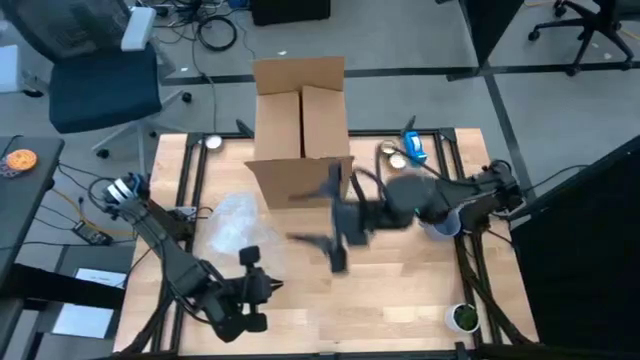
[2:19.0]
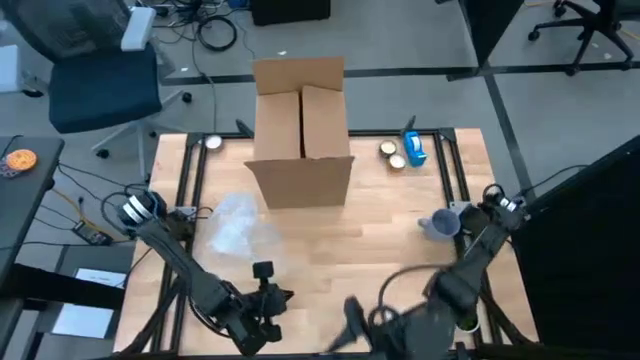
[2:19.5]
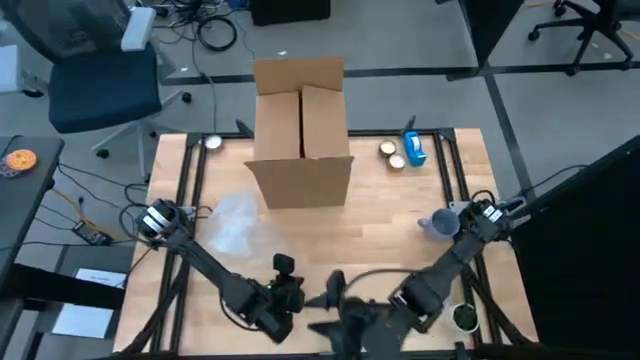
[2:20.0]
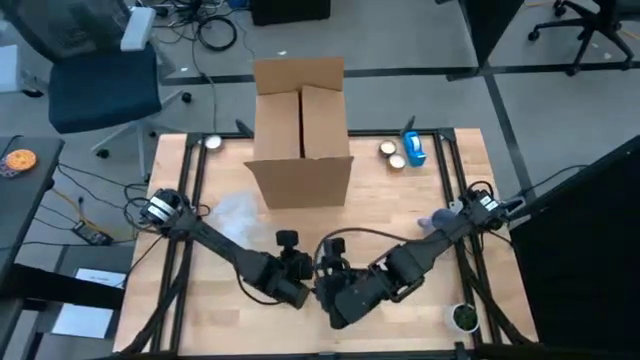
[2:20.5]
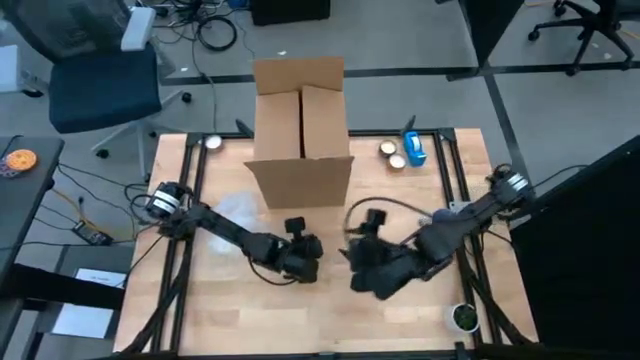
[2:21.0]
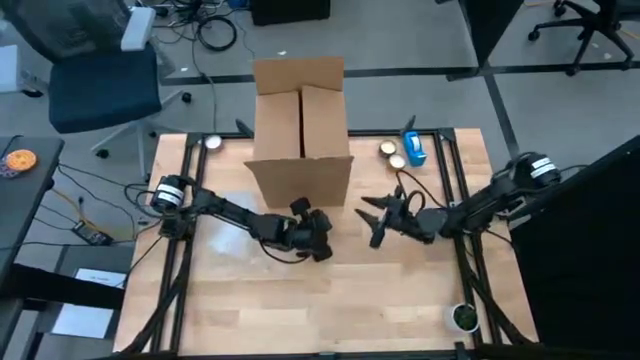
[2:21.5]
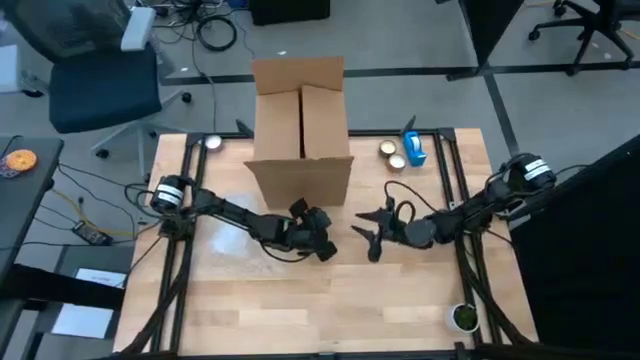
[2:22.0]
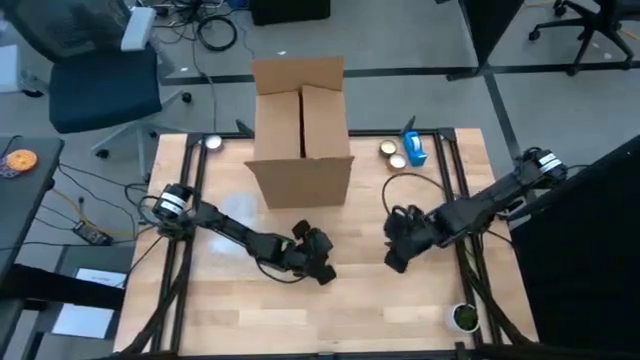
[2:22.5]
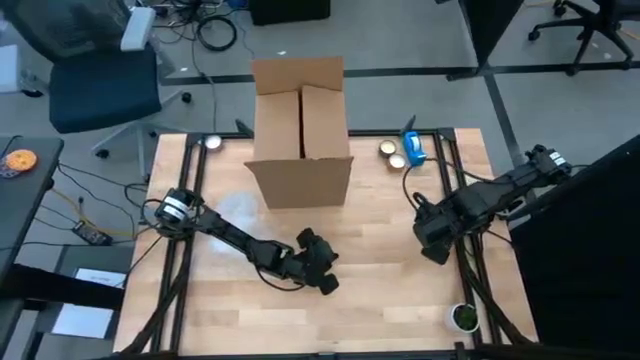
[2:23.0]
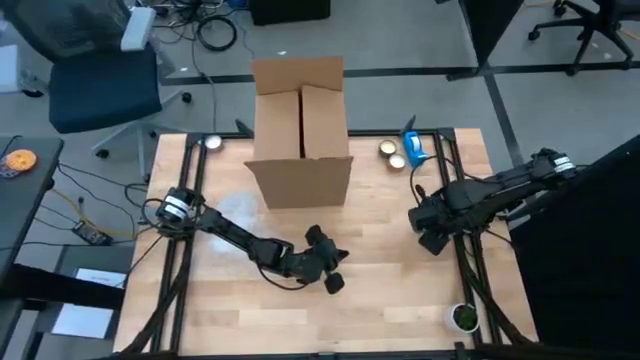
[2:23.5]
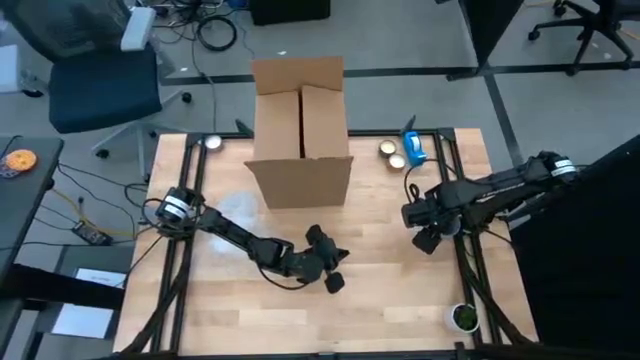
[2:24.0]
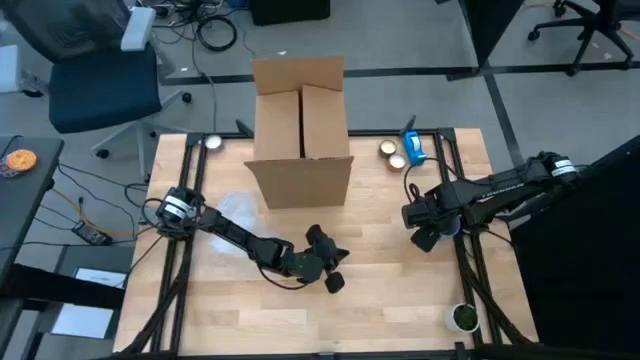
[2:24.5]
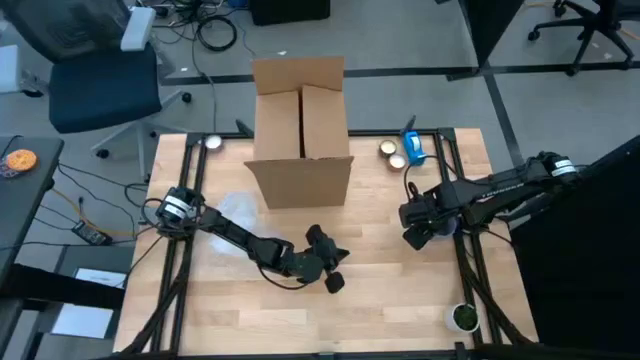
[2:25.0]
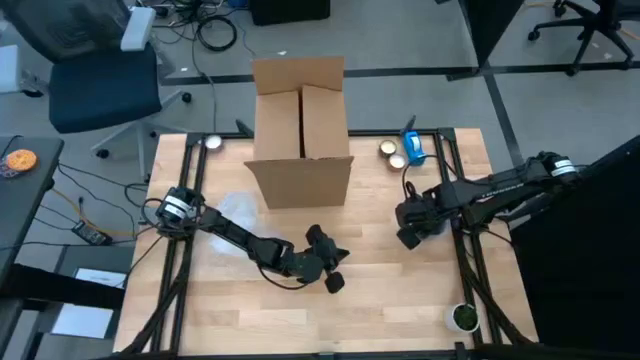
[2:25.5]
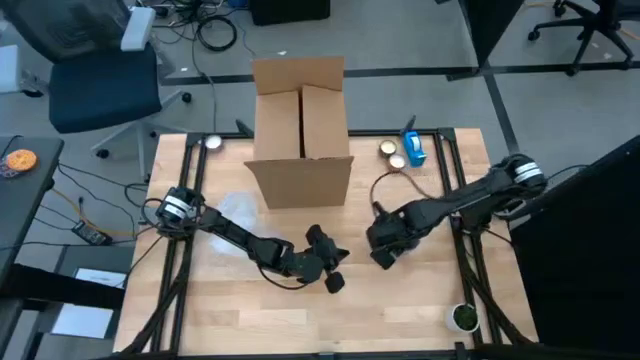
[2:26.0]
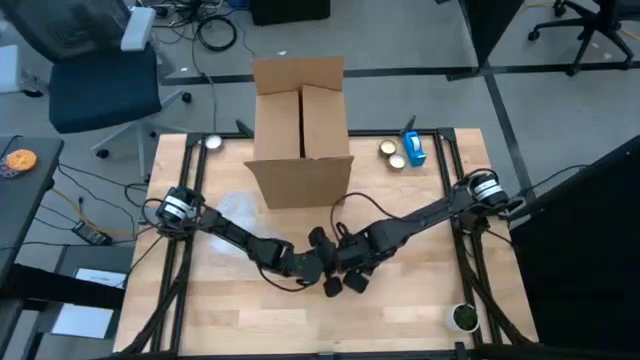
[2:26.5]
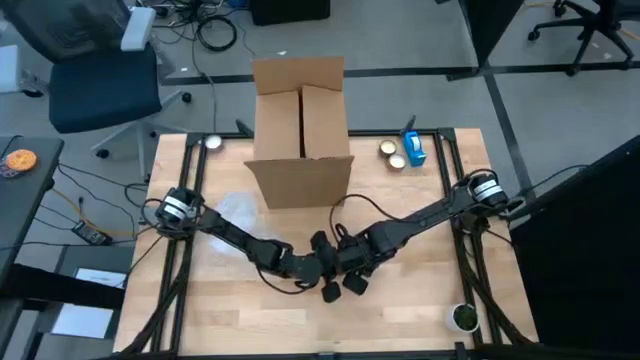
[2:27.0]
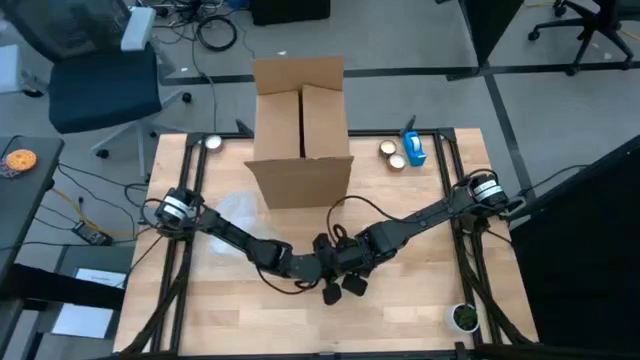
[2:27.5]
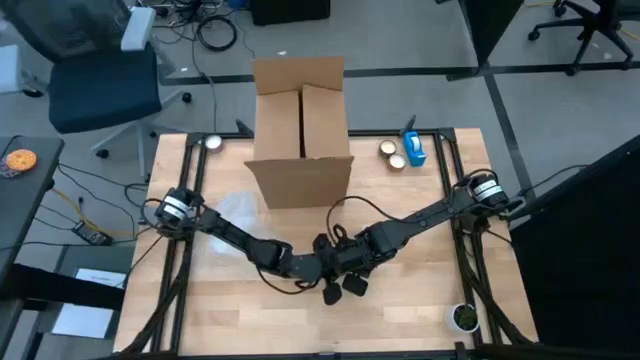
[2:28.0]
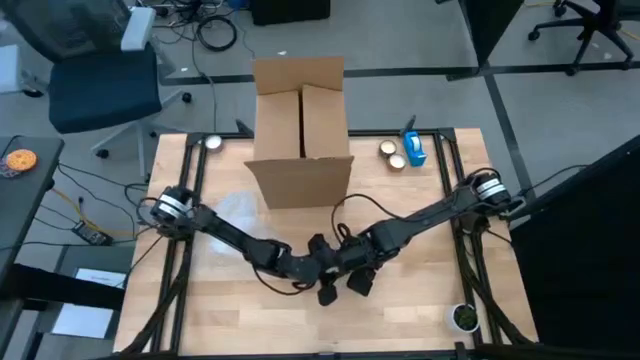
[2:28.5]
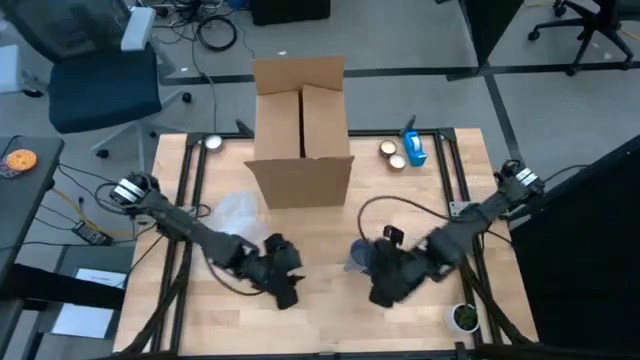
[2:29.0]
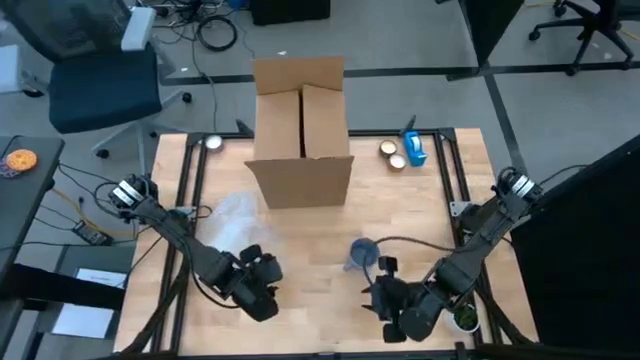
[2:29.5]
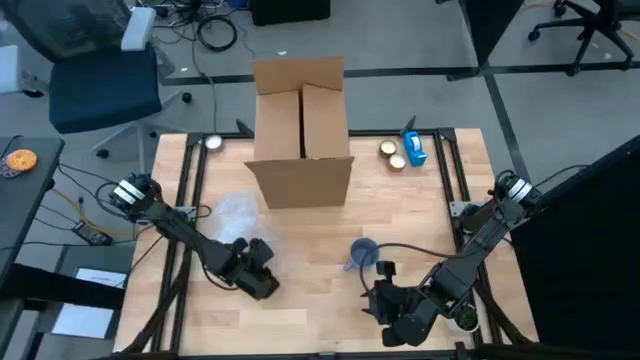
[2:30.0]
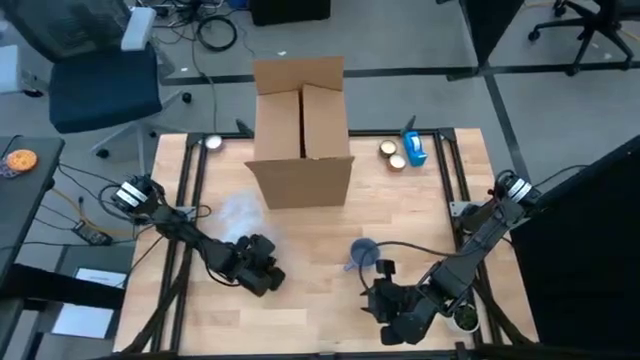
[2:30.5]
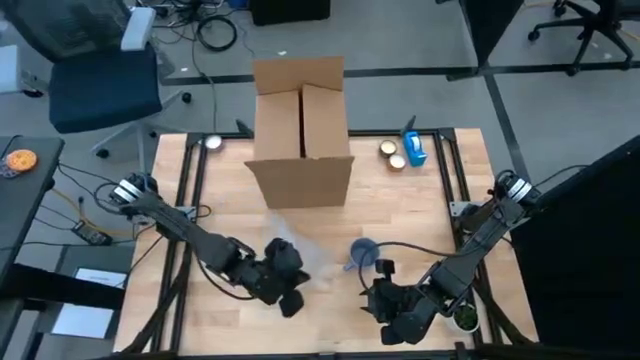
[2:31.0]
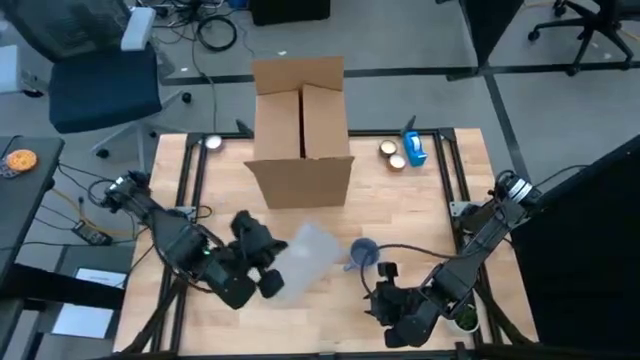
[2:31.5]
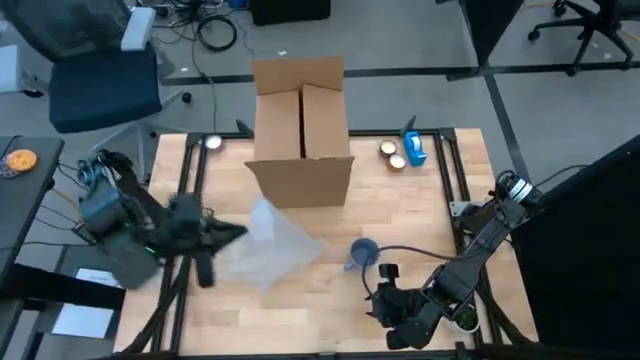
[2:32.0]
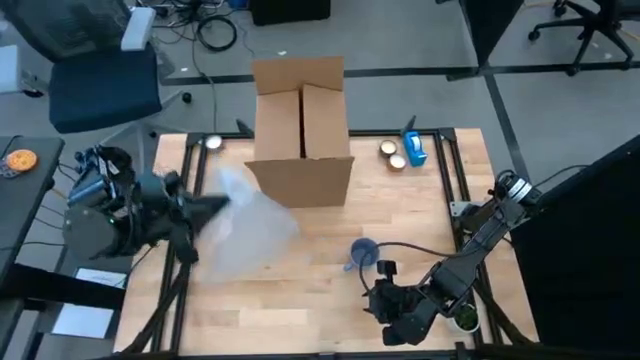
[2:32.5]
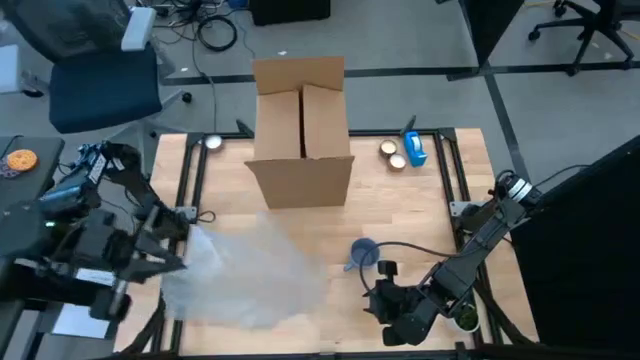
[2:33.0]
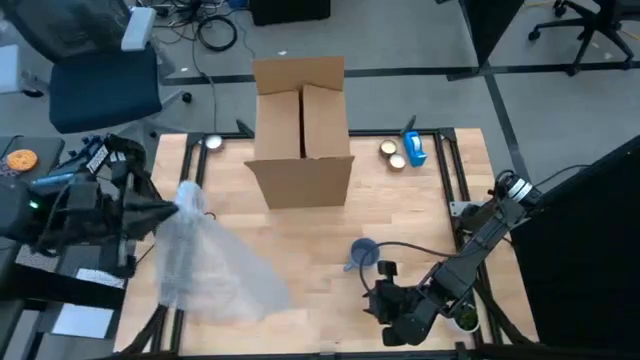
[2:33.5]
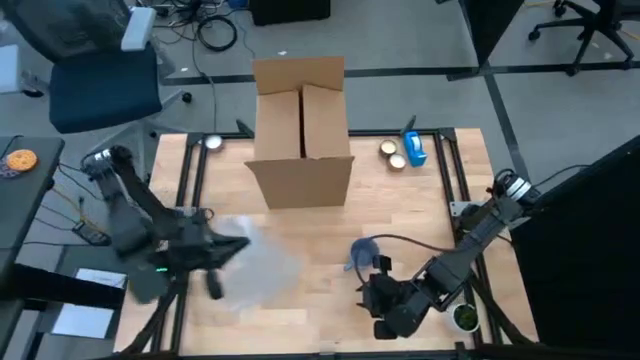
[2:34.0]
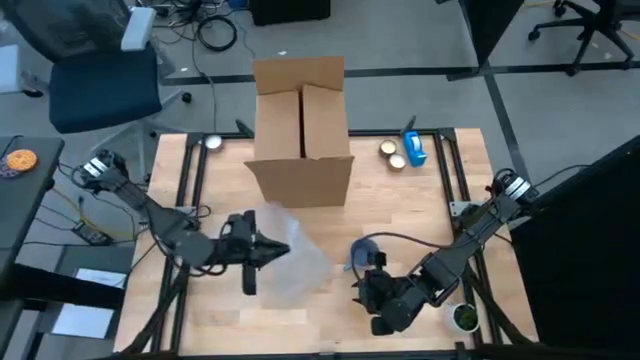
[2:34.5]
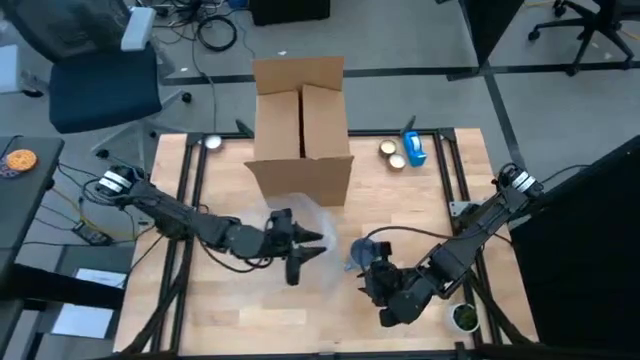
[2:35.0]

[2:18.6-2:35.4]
Task: wrap mug
Wrap the blue mug with bubble wrap

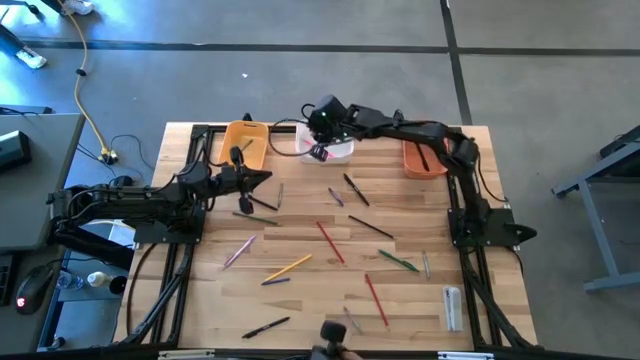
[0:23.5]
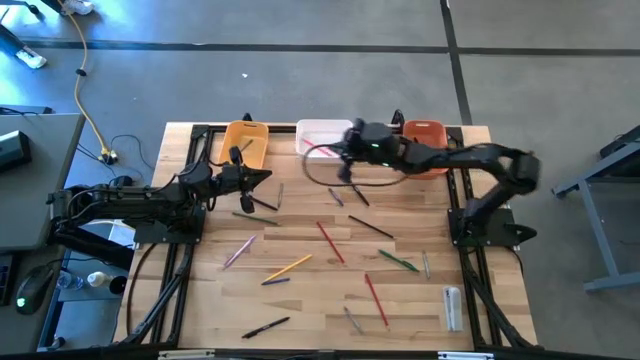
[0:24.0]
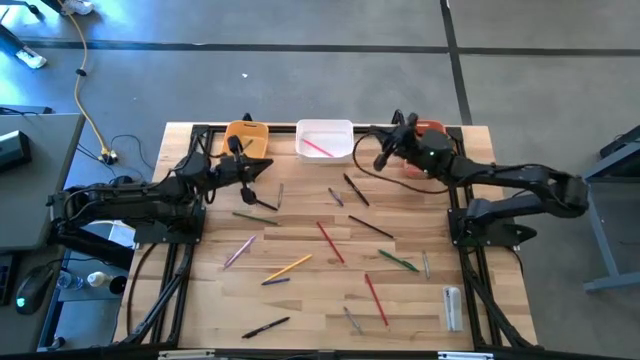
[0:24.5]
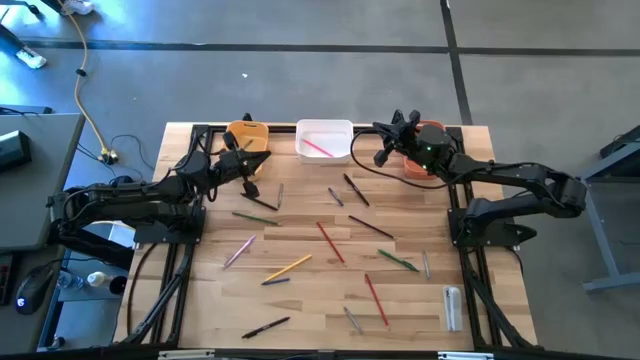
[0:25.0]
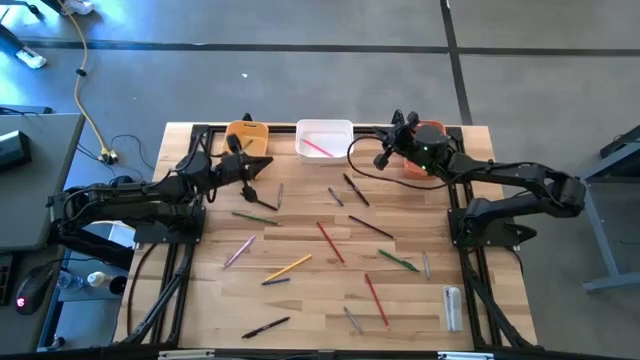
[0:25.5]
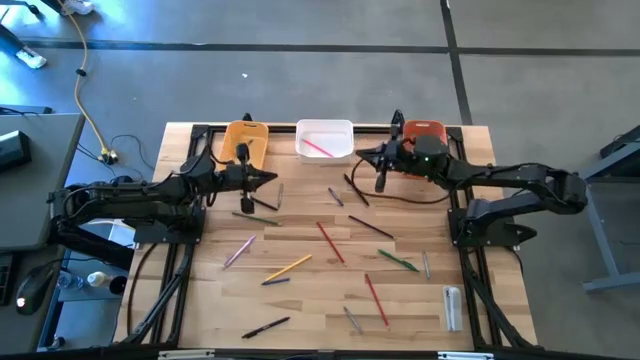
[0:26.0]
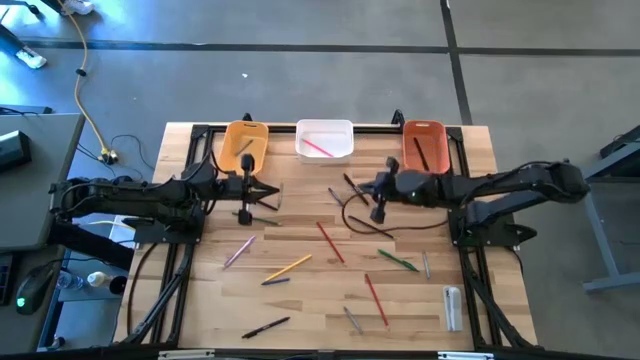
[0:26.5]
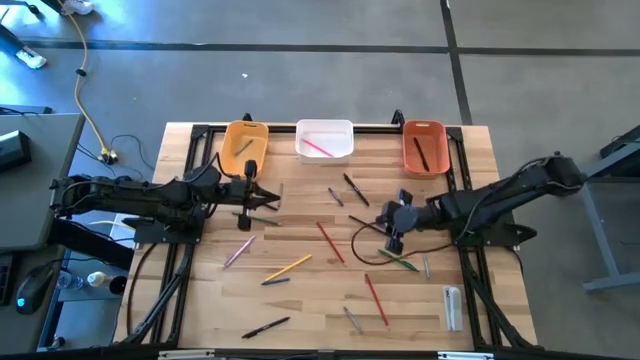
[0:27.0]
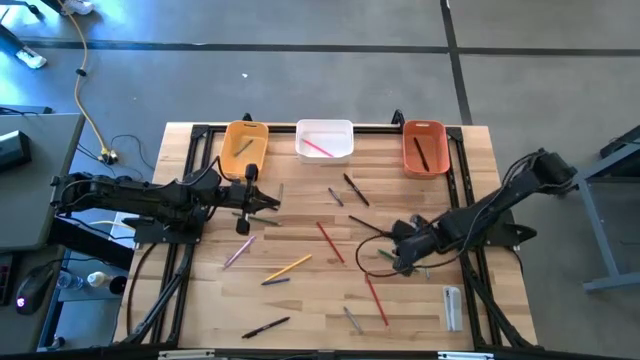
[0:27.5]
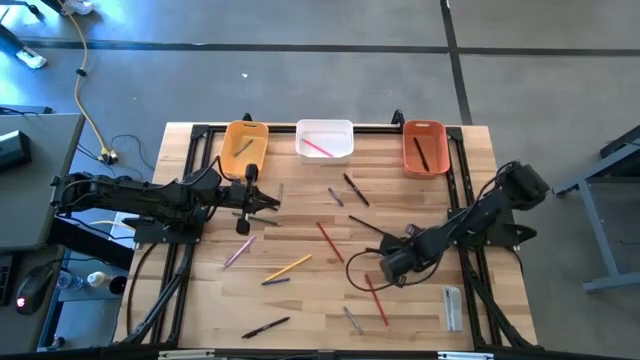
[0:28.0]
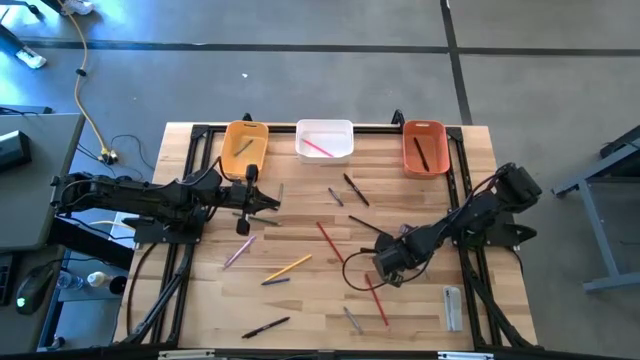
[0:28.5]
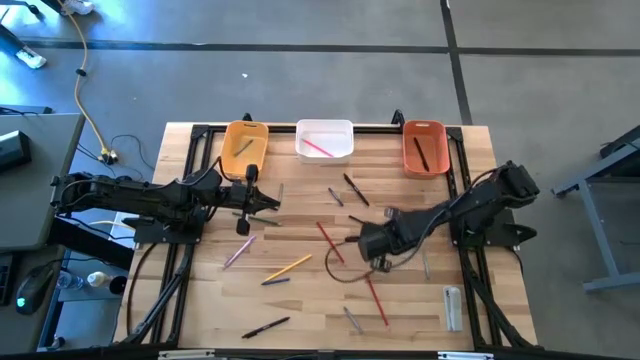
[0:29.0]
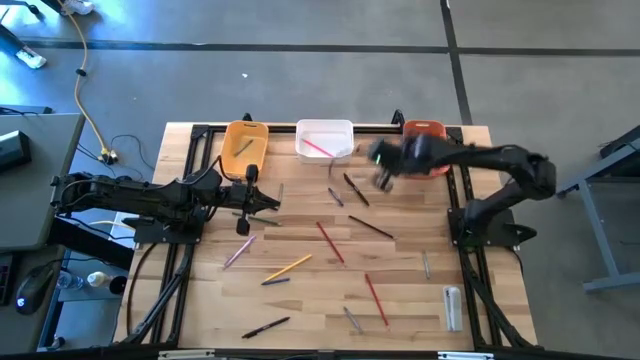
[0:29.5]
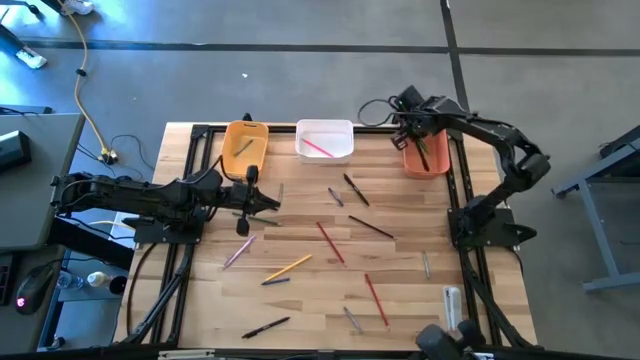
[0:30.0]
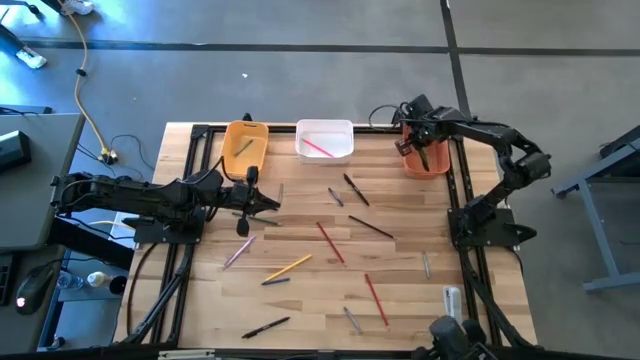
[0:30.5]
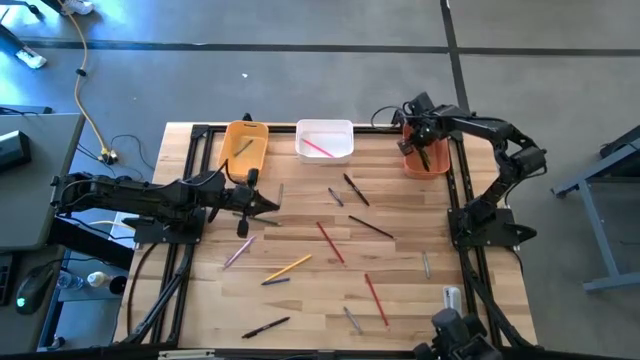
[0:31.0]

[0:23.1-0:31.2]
Task: Sort crayons/erasers/pens/pencils in bins
Put the green pen into the orange bin
